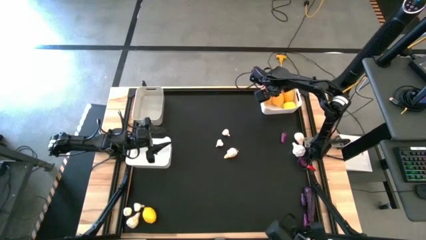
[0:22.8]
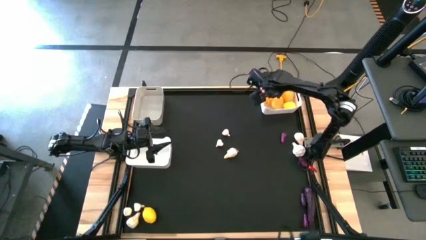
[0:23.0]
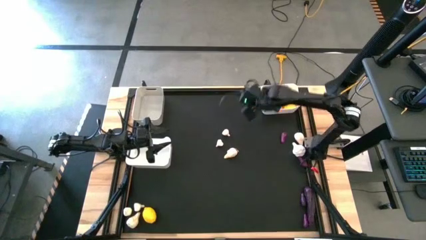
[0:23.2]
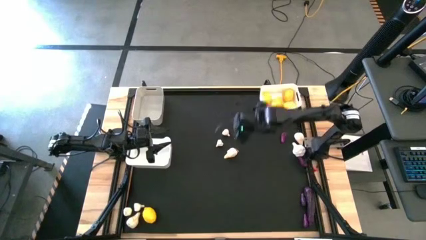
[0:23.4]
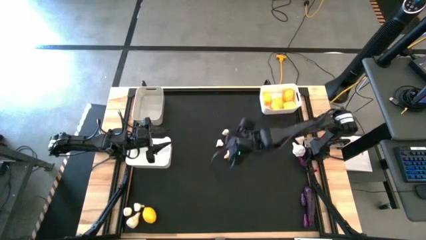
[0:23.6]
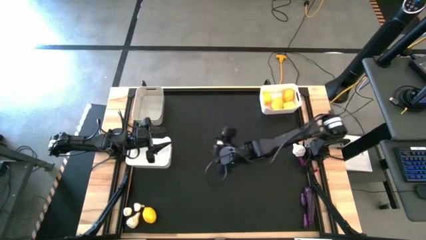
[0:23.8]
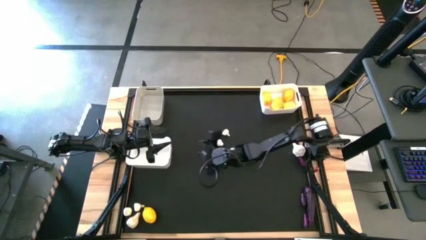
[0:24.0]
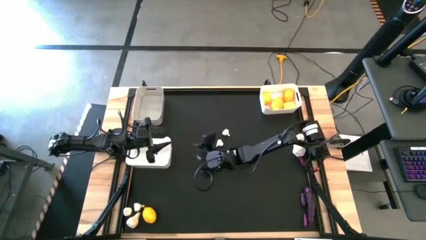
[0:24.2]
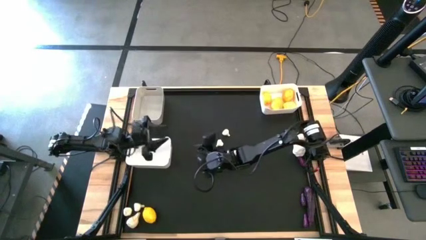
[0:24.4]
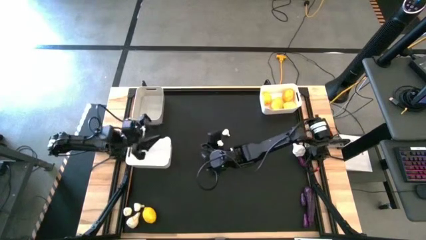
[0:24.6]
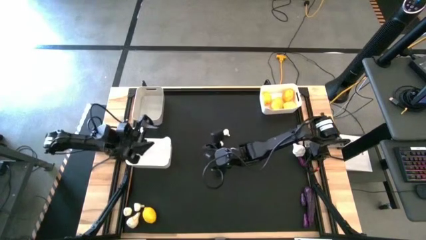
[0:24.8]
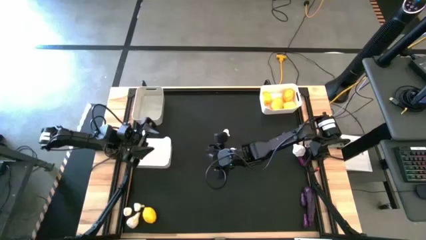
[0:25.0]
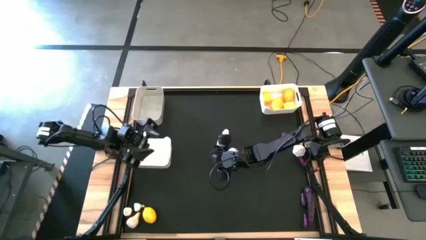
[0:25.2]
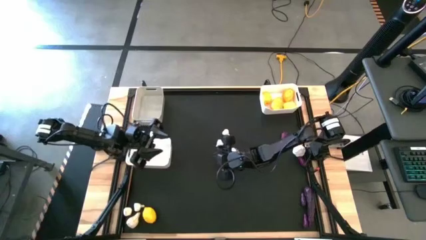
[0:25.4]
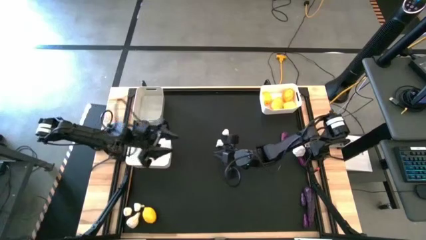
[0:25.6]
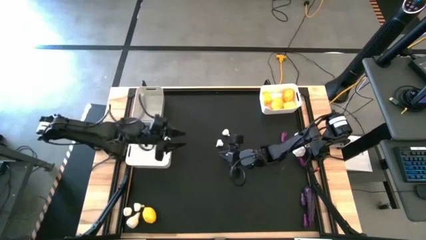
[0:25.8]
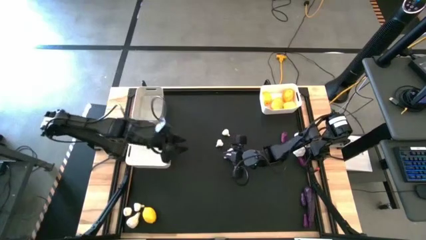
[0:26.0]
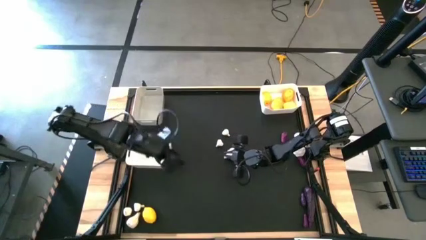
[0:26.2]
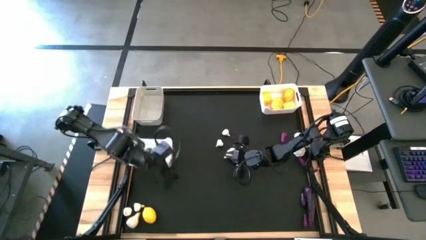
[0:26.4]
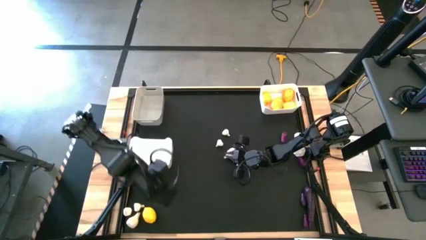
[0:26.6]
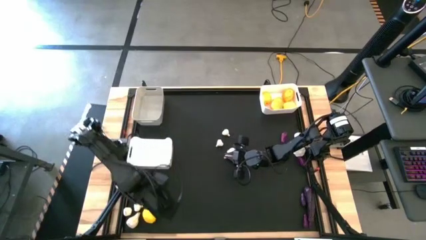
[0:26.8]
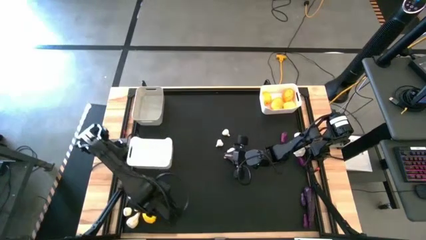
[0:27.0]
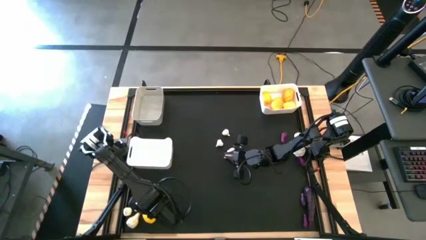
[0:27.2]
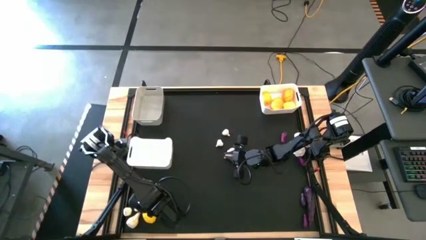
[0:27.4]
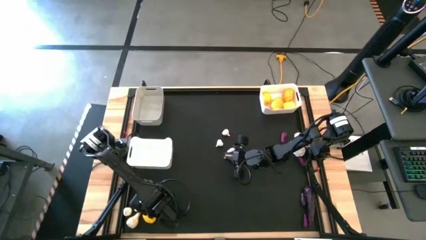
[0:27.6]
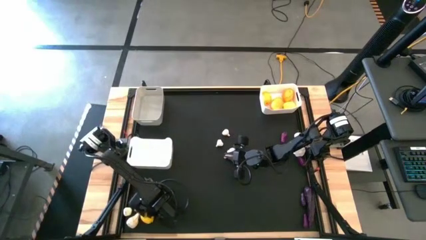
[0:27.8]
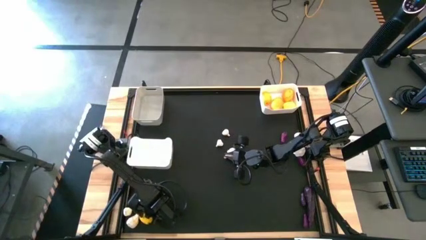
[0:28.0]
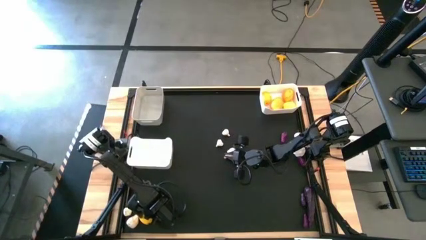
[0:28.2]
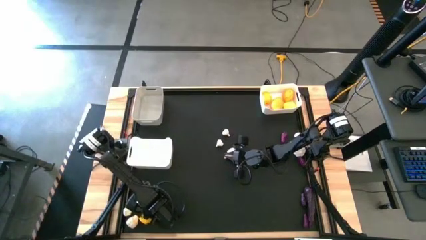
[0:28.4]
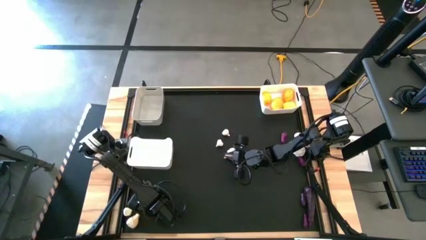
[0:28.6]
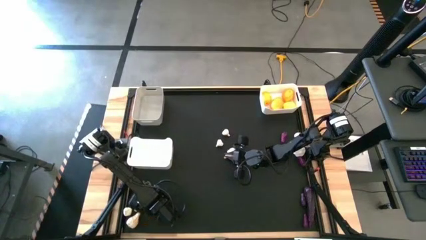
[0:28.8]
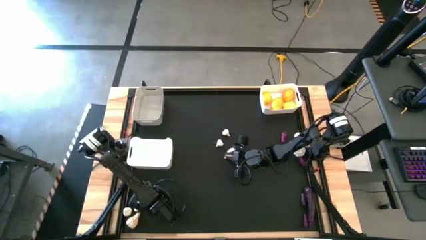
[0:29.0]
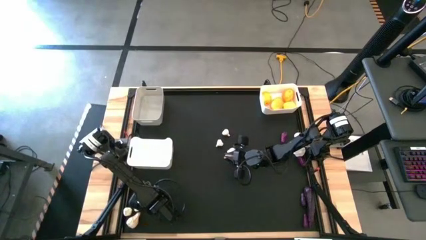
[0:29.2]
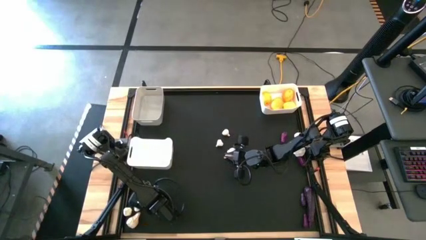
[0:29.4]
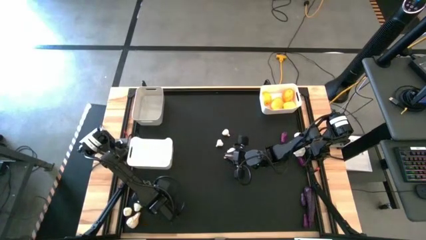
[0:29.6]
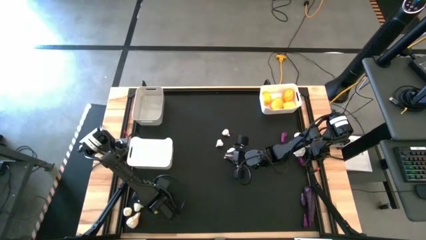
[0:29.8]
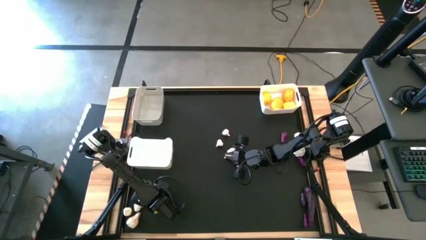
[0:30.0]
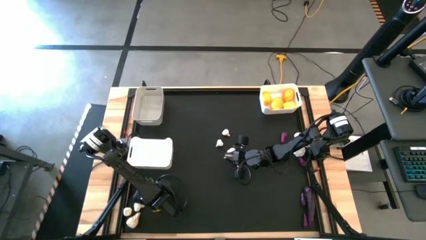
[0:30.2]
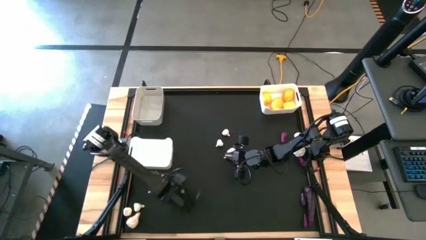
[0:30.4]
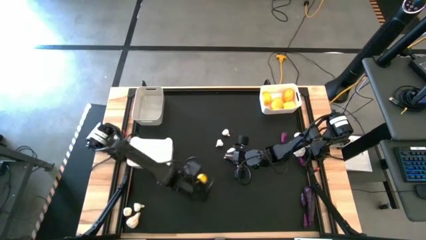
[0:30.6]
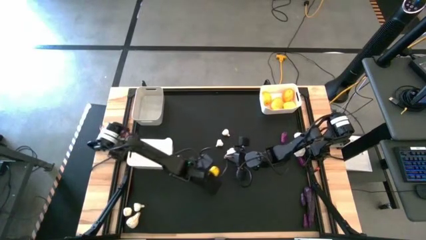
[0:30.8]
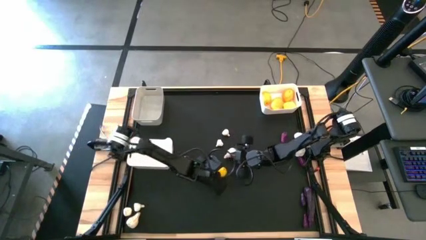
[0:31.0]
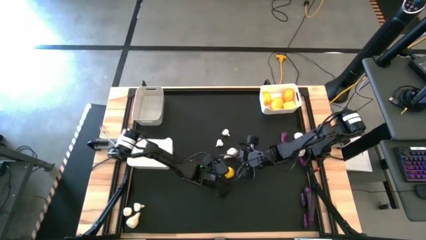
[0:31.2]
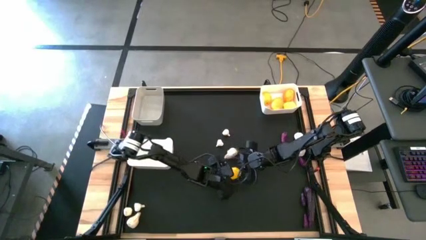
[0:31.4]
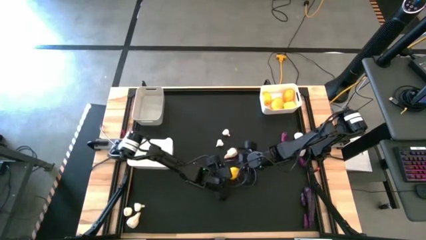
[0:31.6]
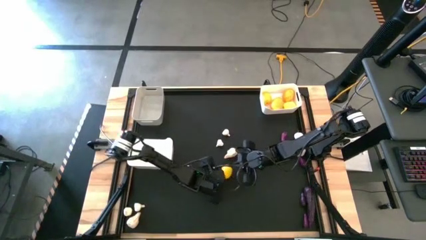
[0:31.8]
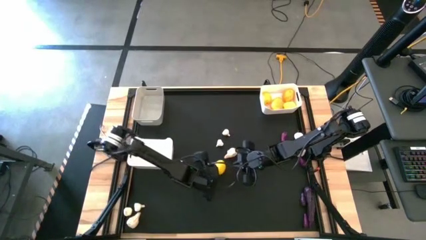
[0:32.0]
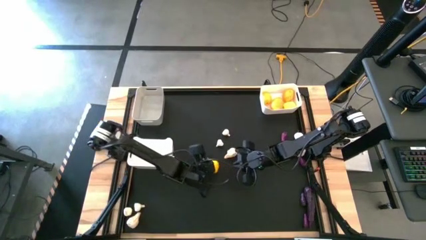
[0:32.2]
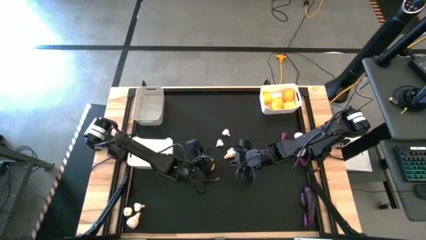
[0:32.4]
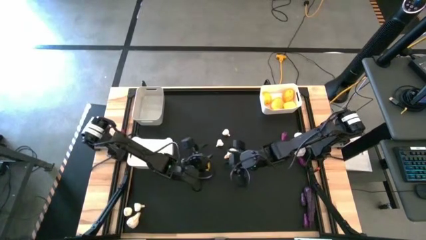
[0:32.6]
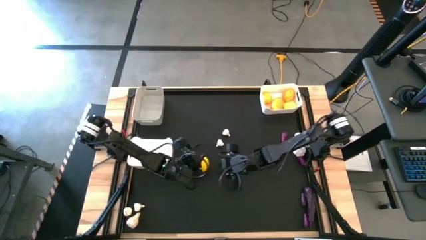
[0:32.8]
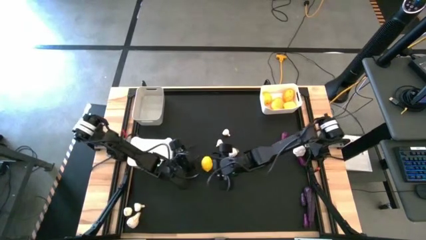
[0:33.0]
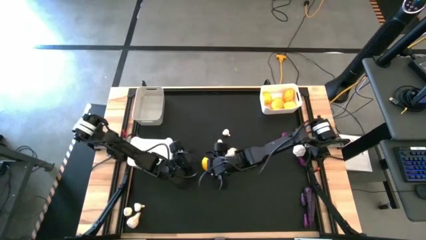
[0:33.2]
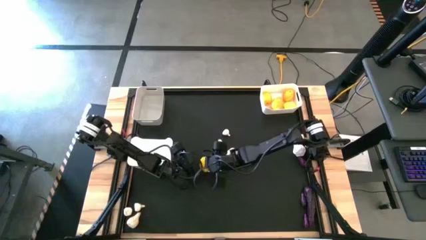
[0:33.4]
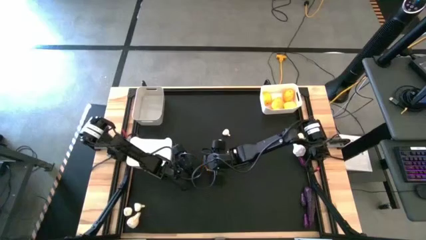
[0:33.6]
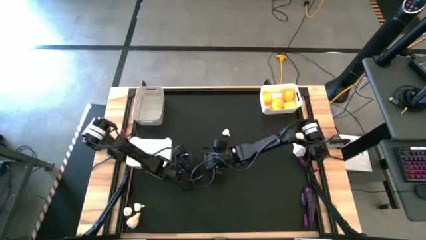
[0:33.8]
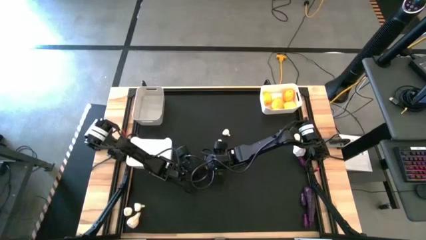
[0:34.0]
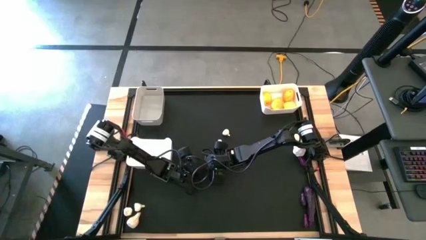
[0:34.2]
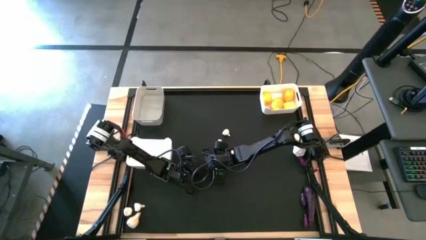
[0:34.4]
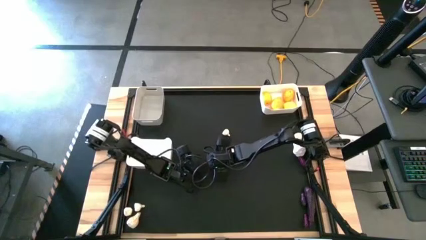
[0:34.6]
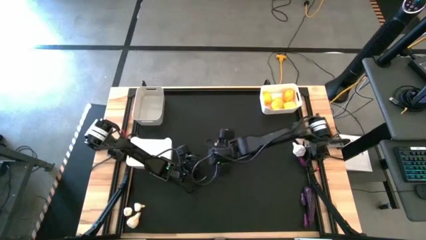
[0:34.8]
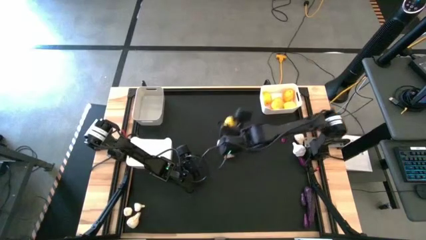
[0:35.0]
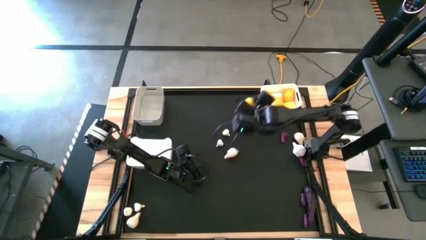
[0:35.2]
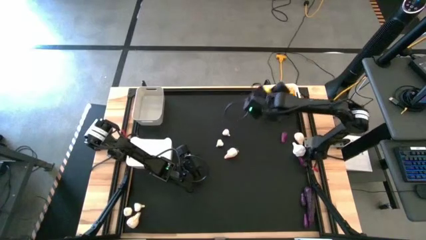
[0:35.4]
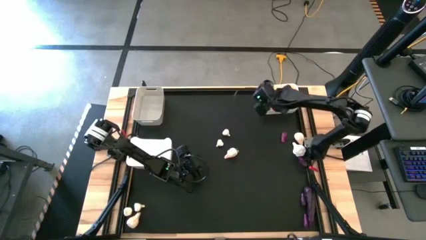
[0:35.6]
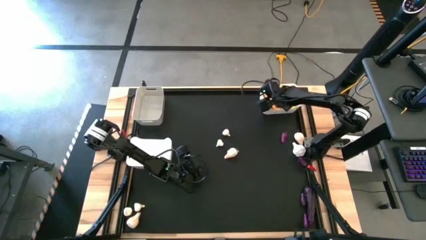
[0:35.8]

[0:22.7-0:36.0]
Task: Sort produce into baskets
Put the yellow lemon into the top white bin

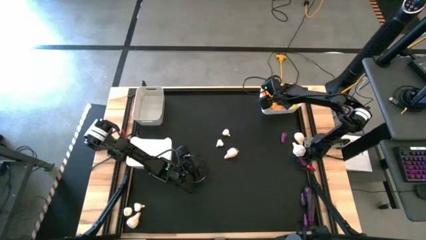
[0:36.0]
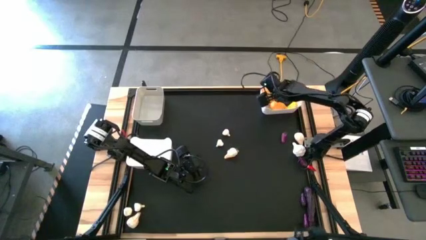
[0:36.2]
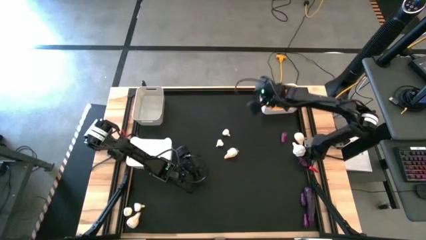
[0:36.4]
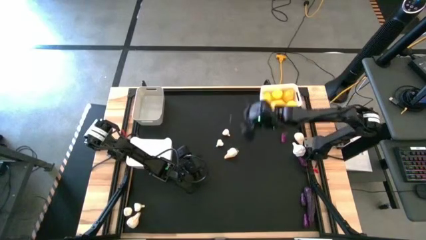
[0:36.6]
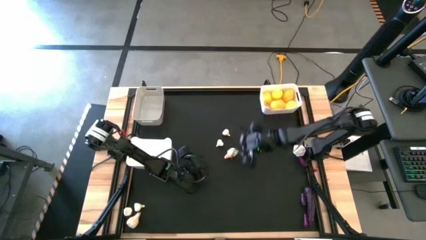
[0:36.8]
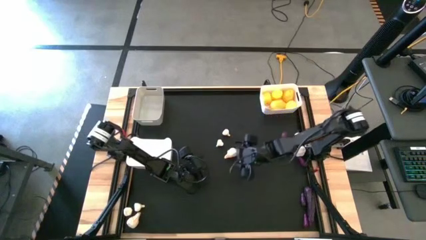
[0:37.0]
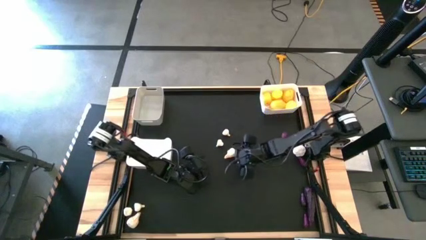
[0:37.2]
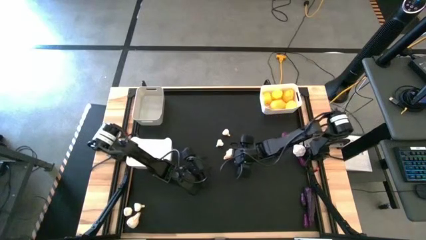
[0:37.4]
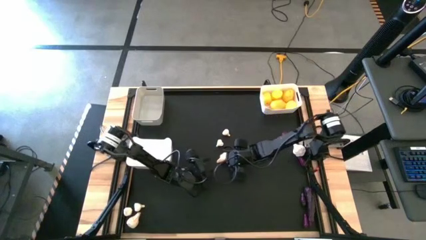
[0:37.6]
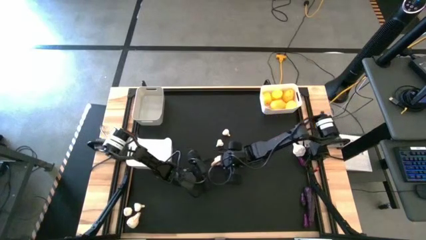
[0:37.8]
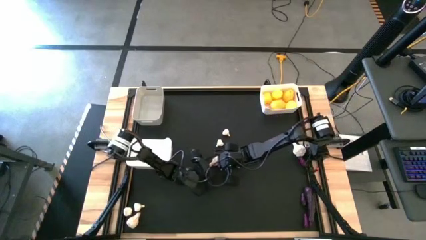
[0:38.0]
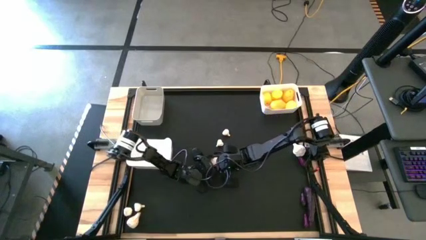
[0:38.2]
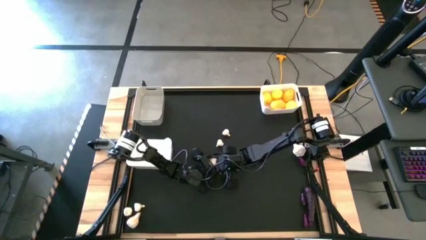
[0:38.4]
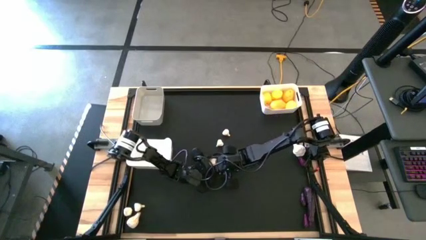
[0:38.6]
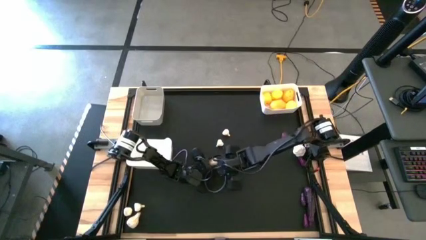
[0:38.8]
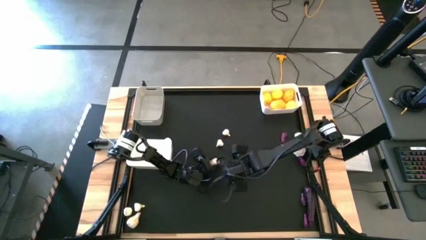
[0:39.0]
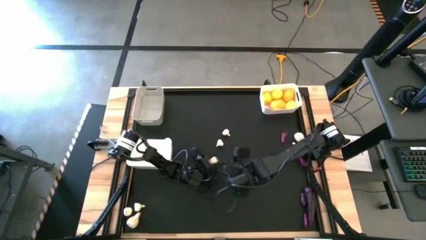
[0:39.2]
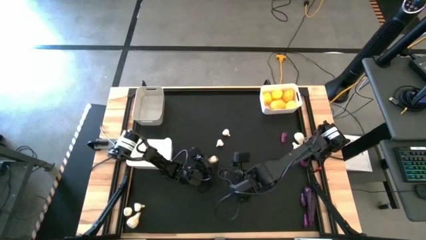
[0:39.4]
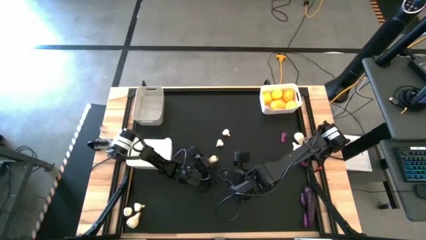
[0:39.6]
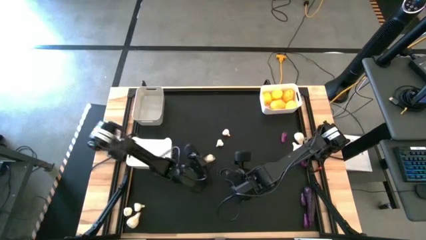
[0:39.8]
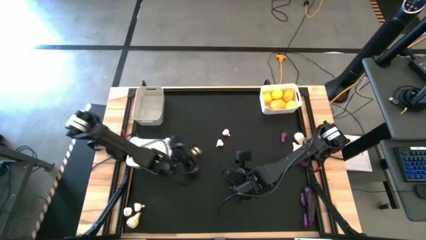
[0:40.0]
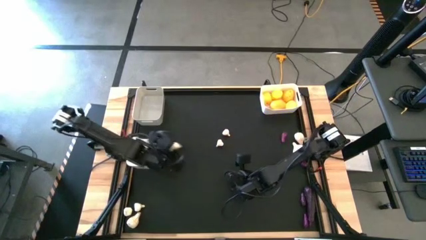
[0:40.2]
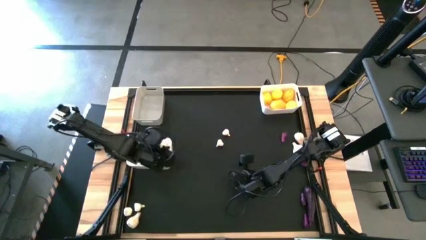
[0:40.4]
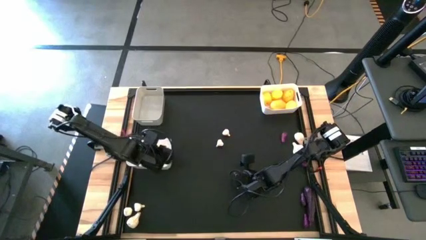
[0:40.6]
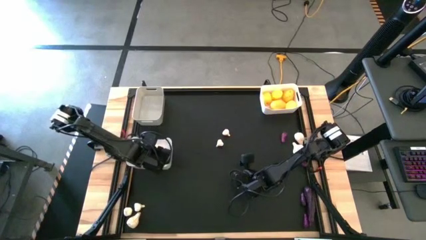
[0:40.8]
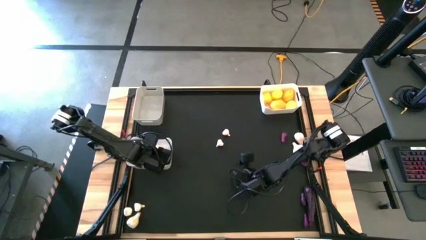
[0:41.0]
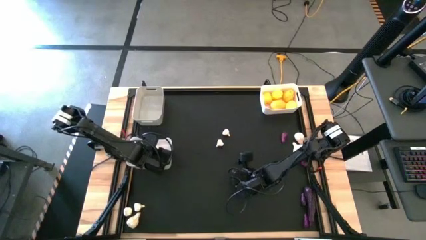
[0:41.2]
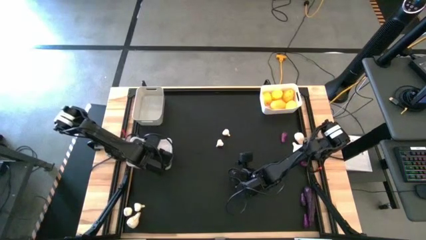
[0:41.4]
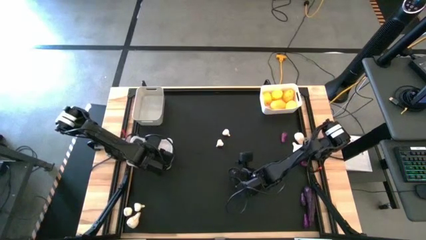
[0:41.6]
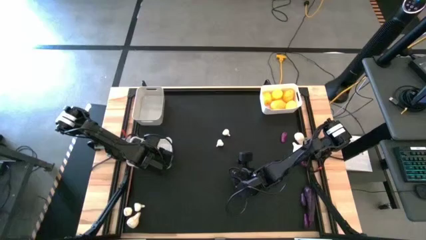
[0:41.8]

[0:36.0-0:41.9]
Put the white garlic into the bottom white bin
